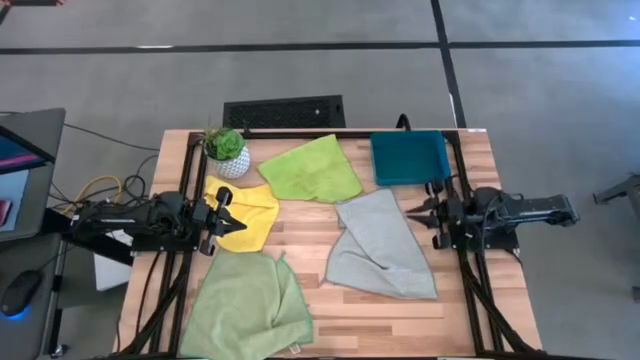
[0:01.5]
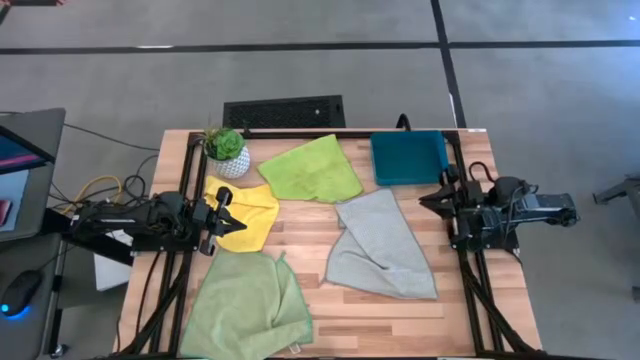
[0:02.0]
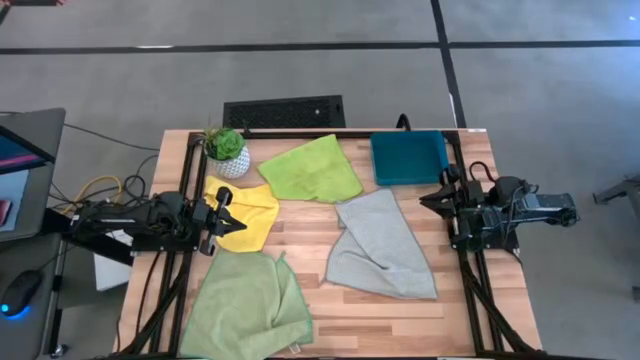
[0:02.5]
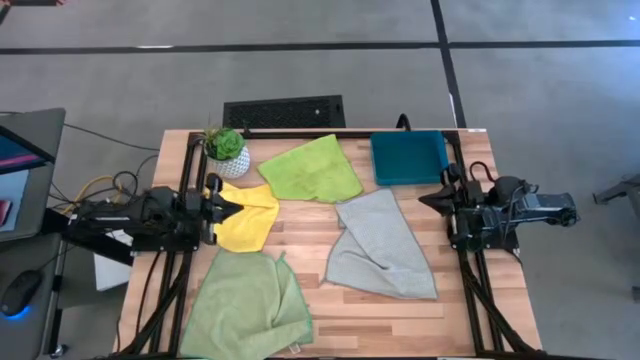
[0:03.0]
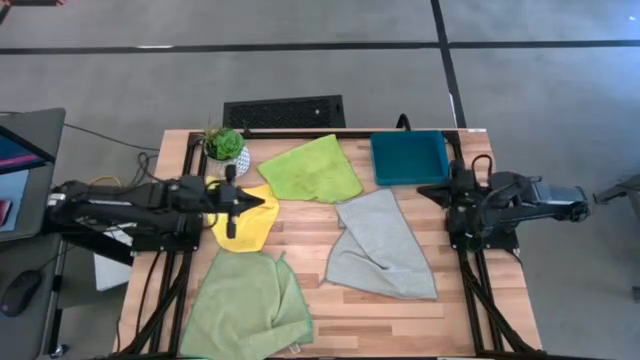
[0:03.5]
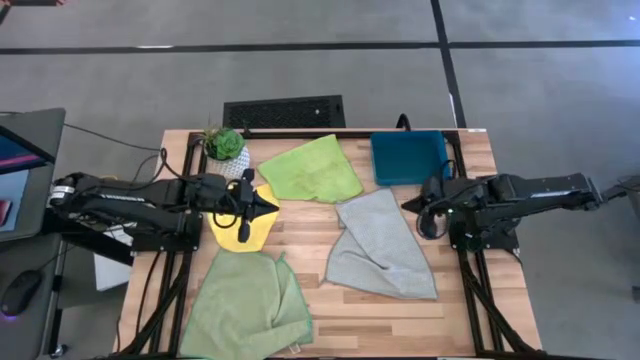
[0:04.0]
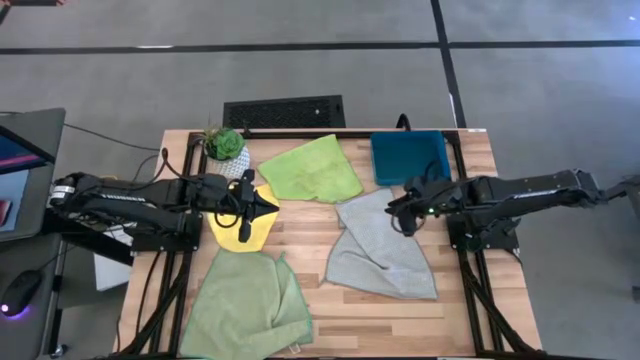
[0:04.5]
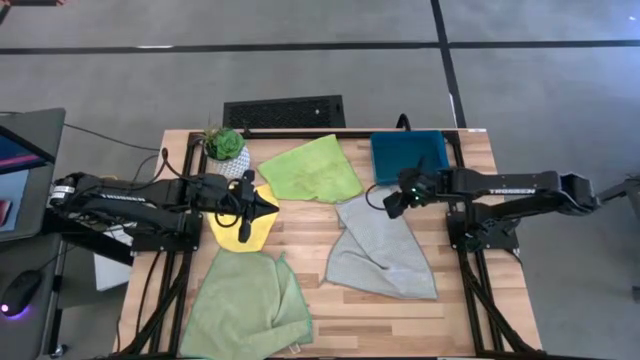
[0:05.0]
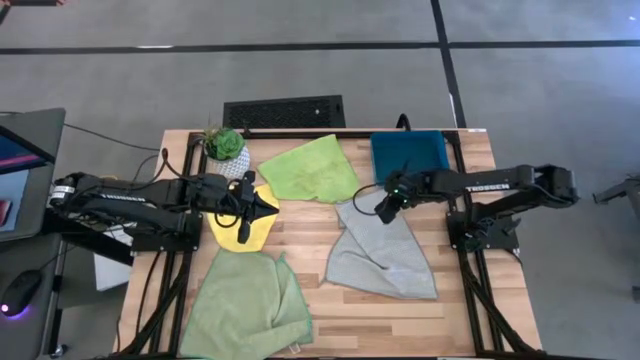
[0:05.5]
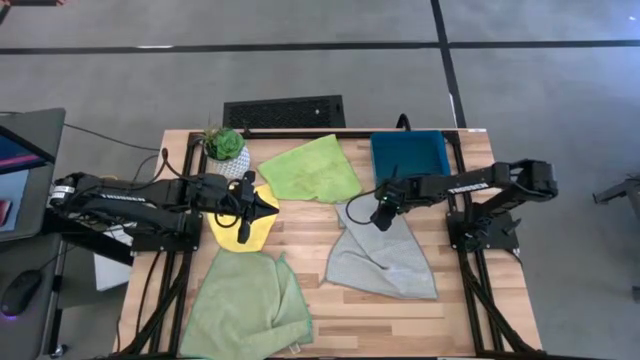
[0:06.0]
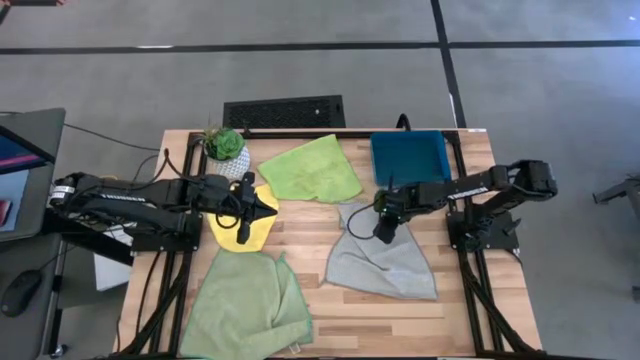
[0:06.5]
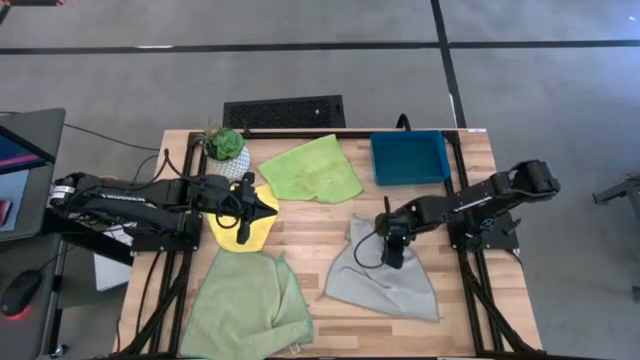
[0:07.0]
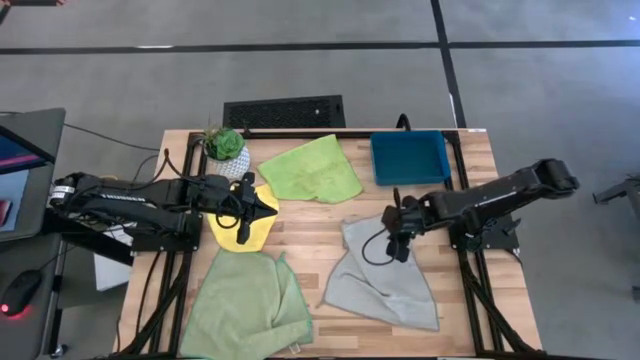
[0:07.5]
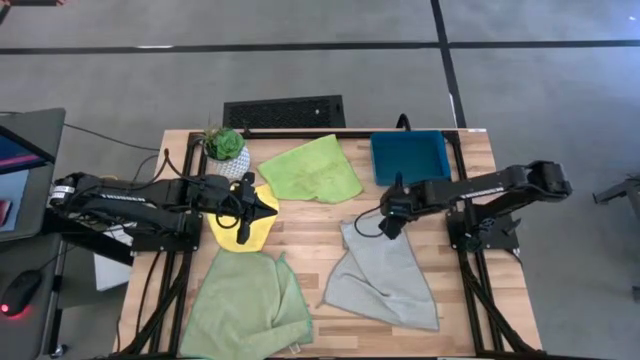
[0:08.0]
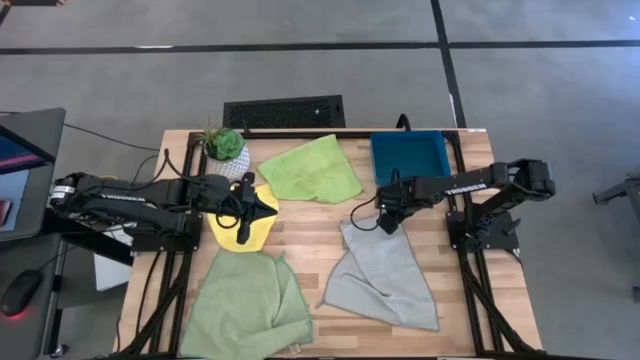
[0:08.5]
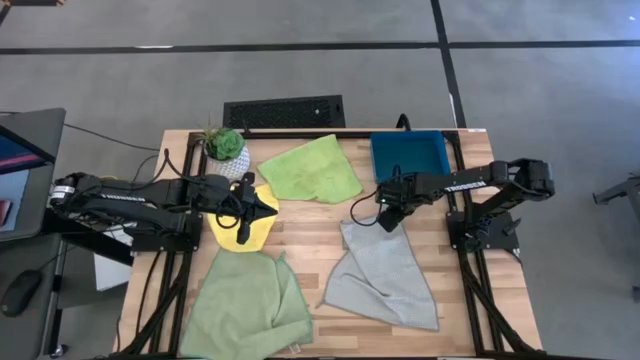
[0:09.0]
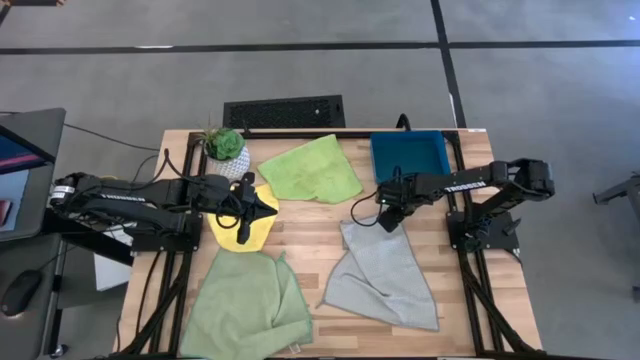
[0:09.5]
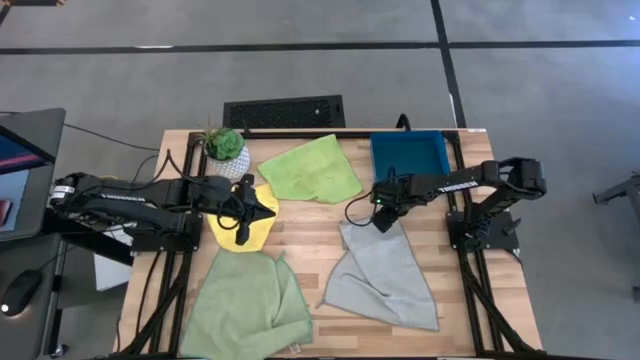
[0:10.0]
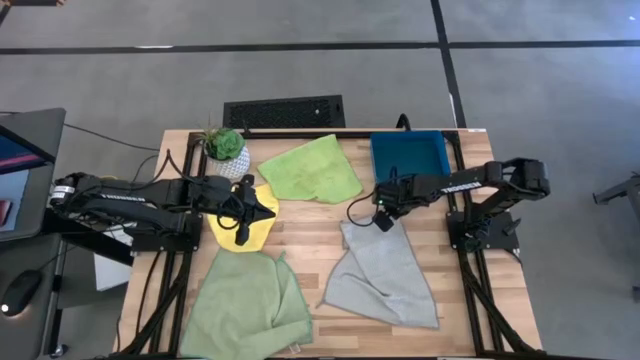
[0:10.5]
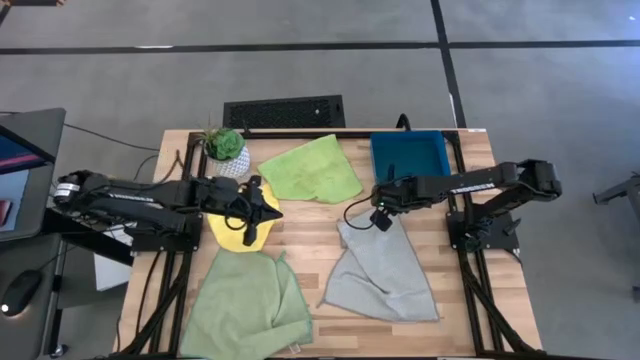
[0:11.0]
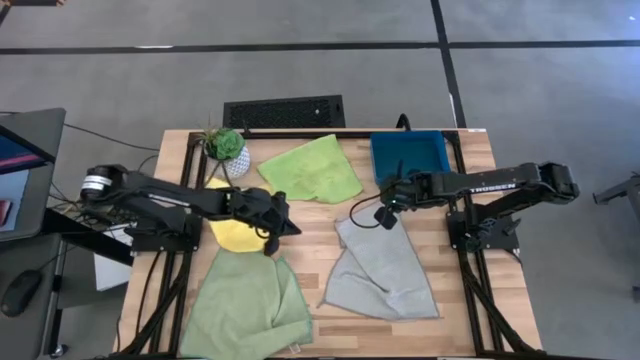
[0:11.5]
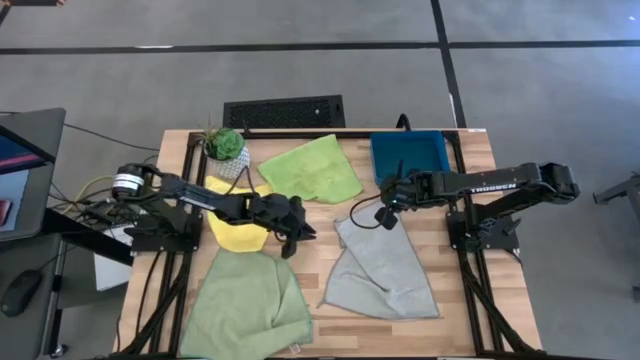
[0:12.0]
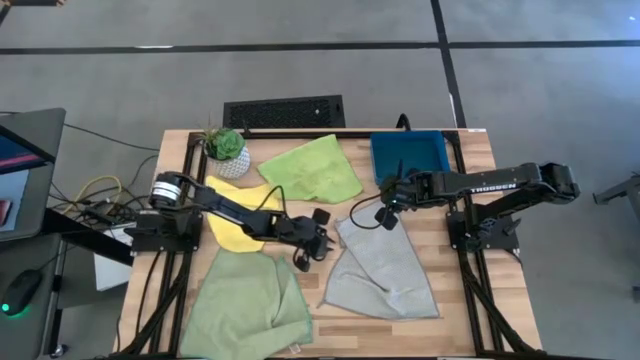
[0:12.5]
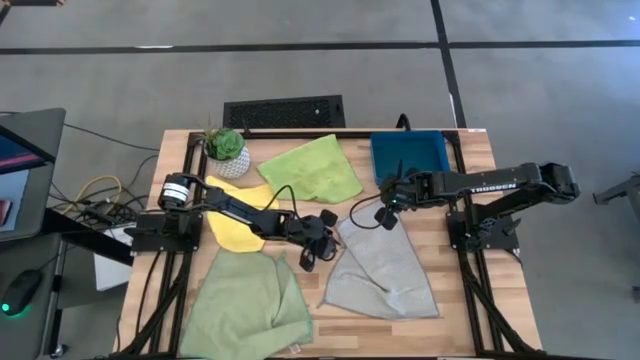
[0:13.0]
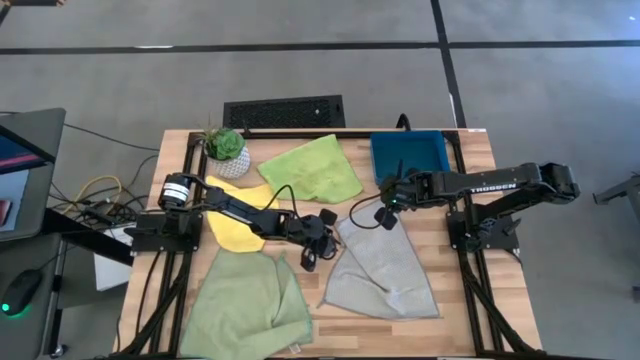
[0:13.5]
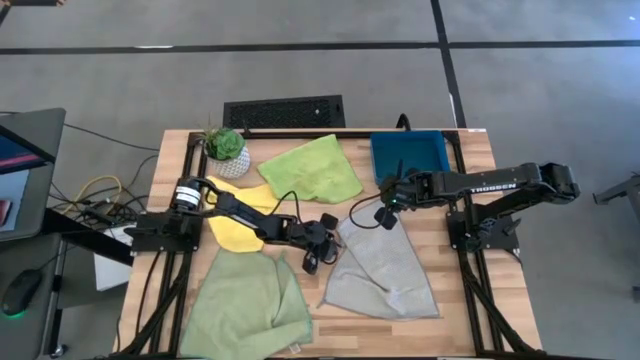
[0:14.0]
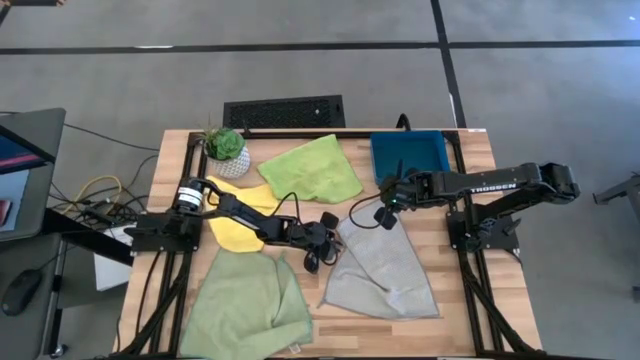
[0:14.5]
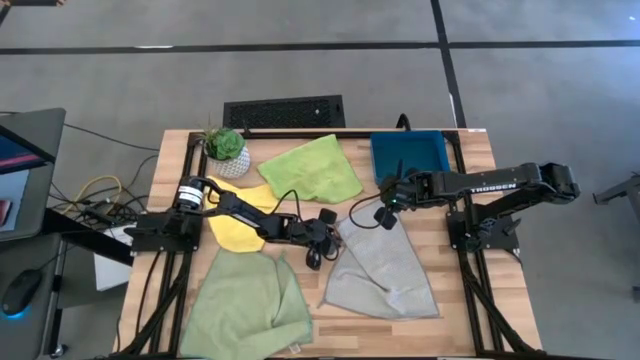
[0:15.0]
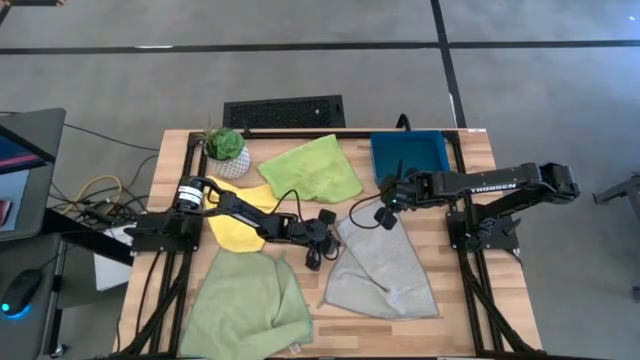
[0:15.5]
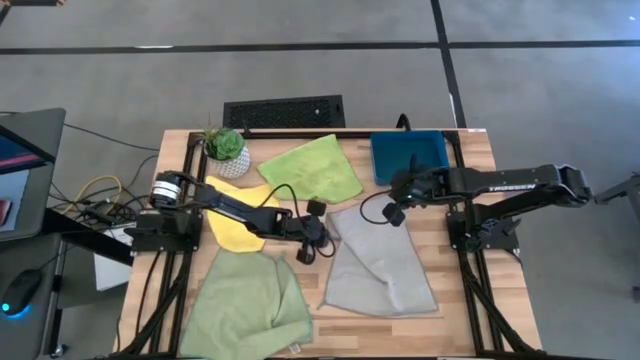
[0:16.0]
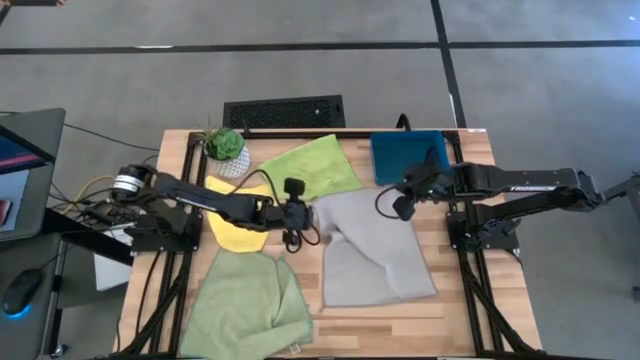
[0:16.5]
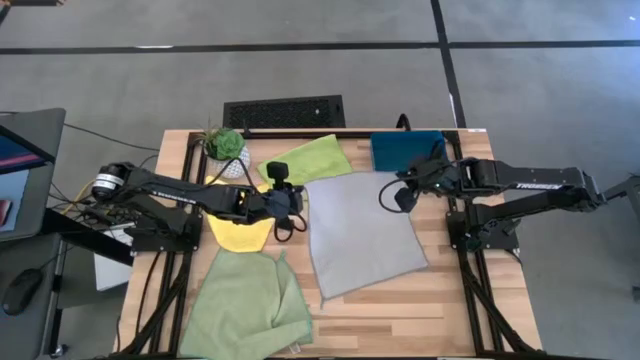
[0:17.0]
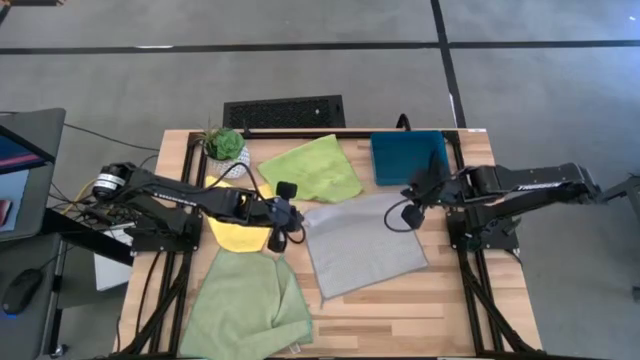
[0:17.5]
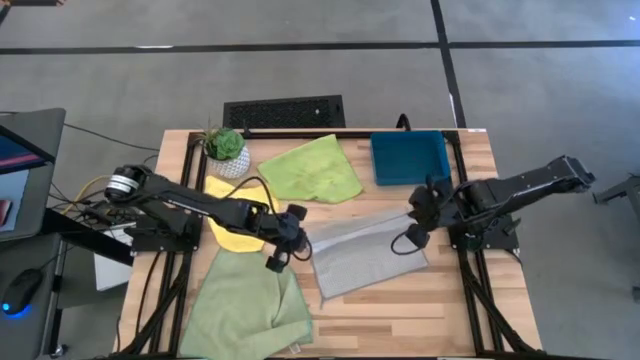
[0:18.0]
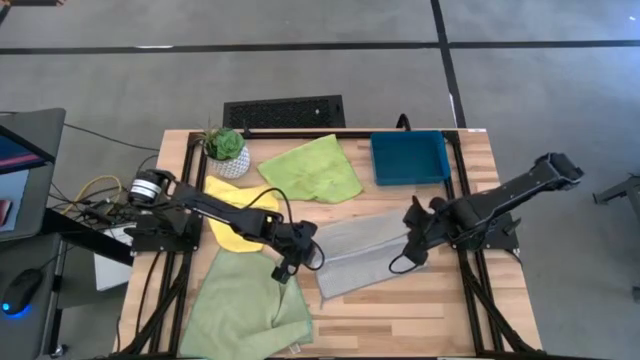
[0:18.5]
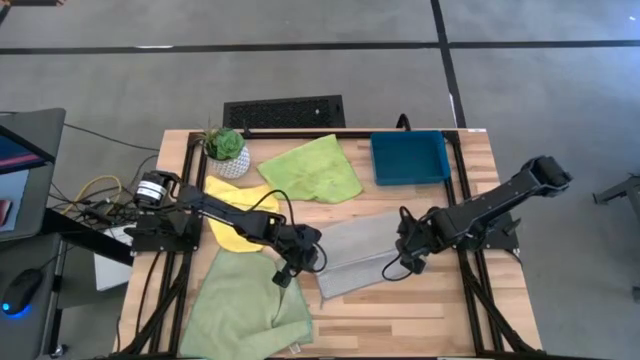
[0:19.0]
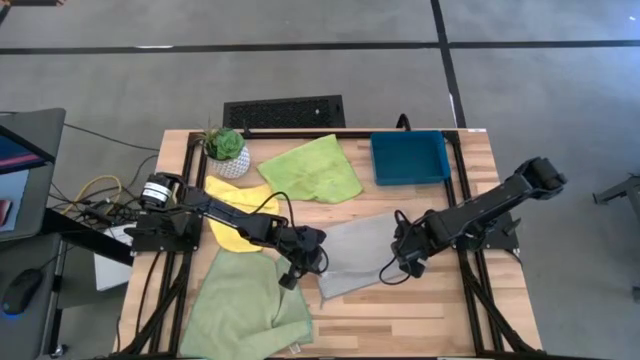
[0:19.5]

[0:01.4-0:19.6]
Task: Fold microfiber towels
Fold the gray microfiber towel

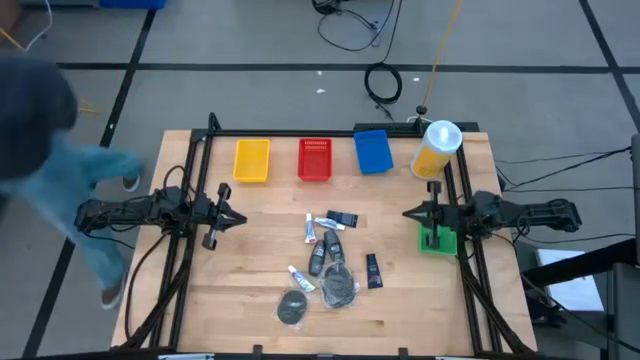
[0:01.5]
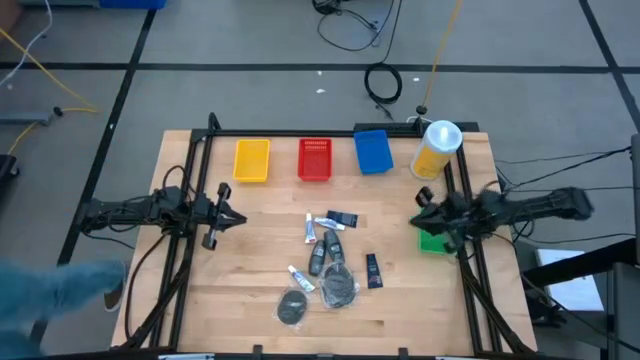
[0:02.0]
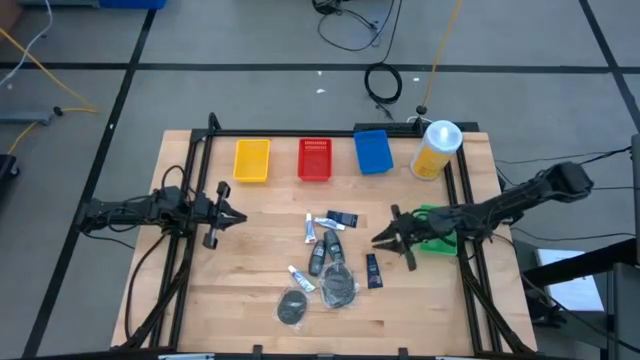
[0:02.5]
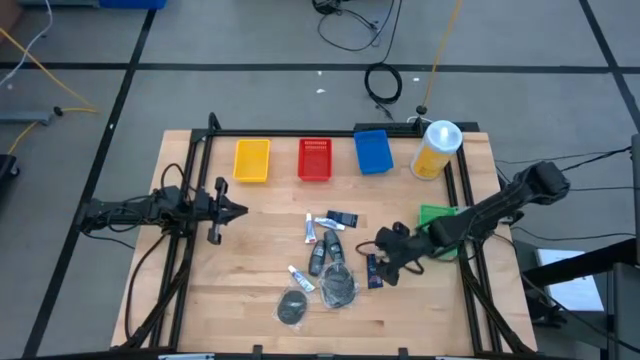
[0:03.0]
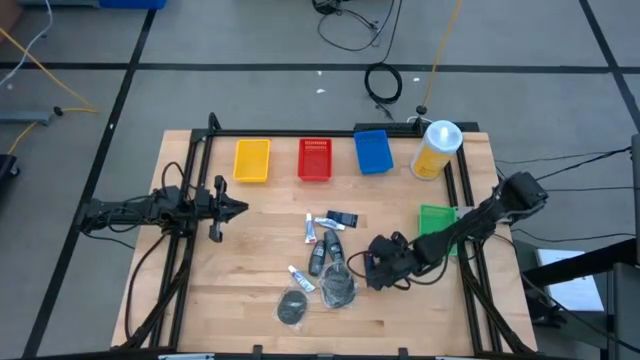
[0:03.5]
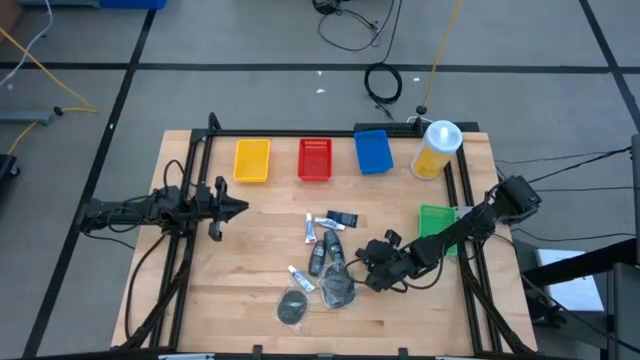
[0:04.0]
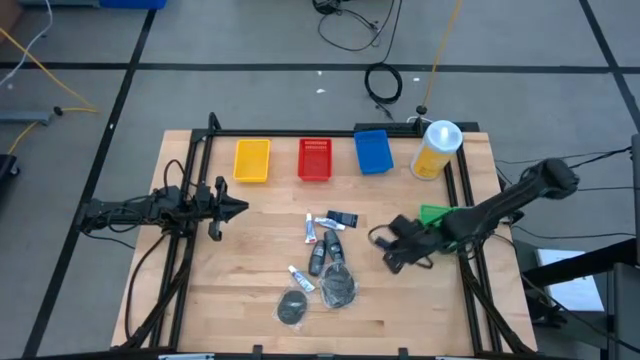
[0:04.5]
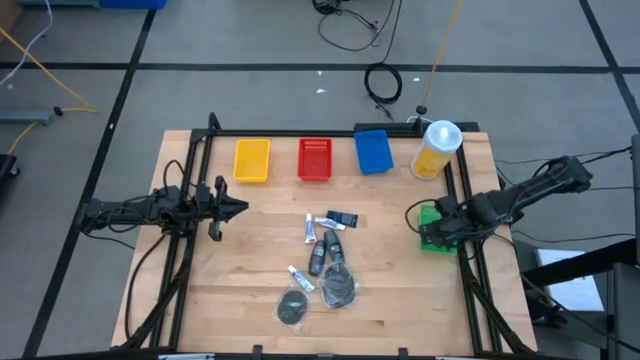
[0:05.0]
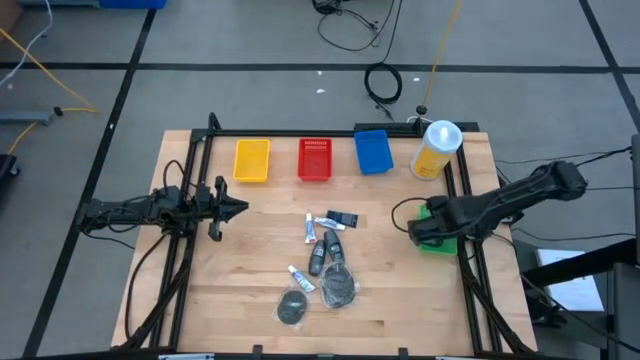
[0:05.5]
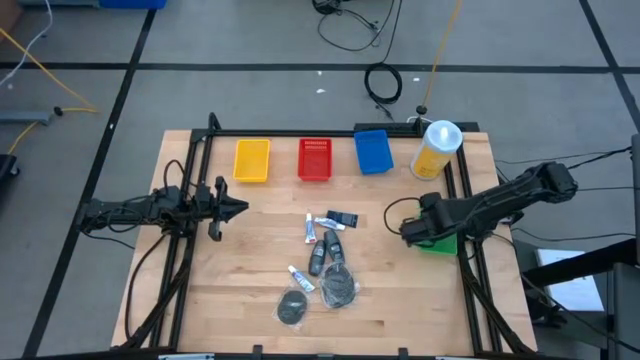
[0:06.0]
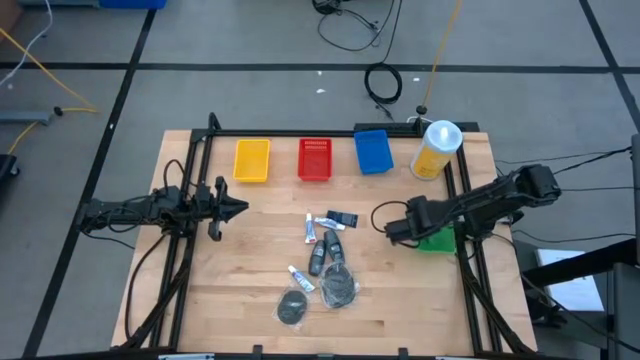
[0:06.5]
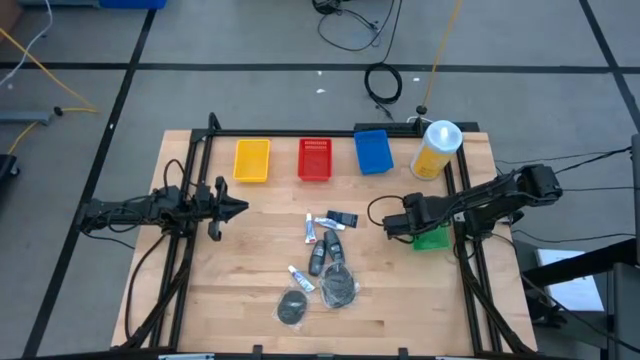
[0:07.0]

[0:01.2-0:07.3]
Task: Pick & Place Travel size toiletries
Put the blue shave cream into the green bin
